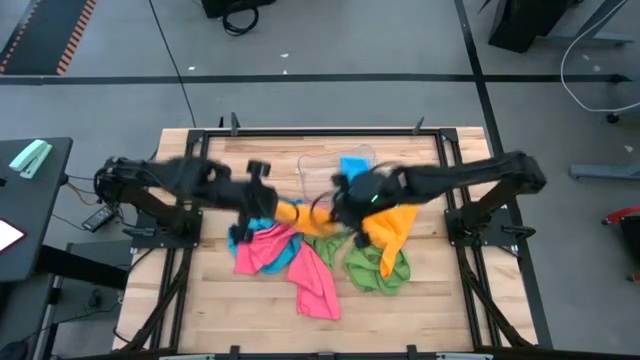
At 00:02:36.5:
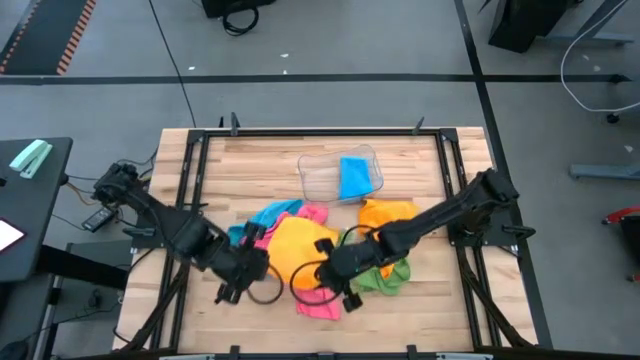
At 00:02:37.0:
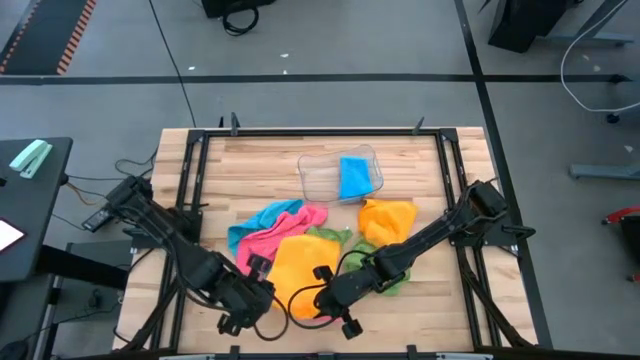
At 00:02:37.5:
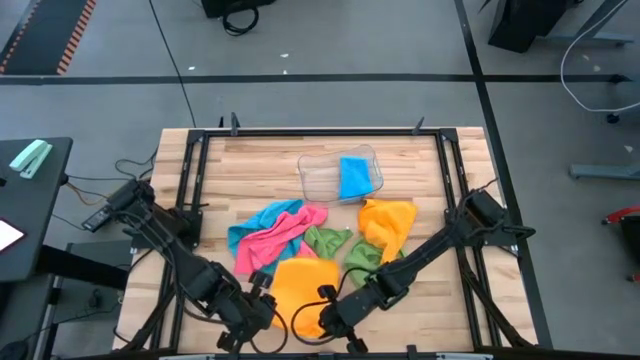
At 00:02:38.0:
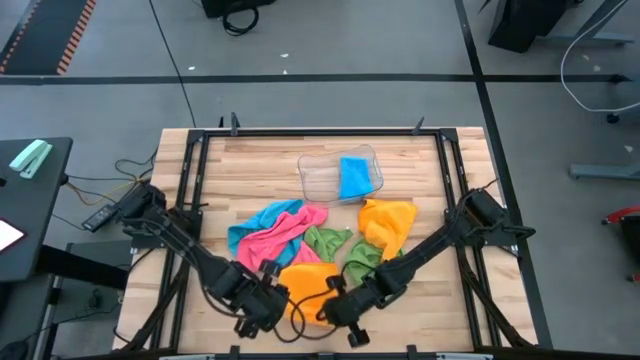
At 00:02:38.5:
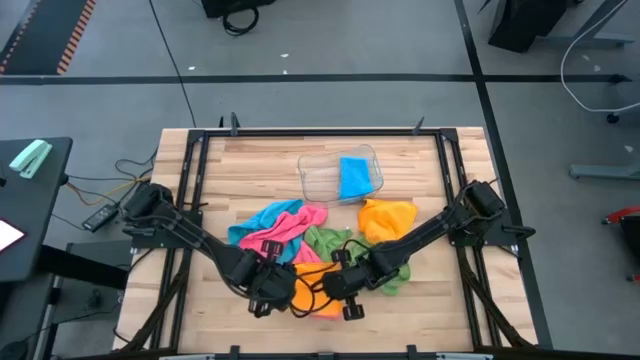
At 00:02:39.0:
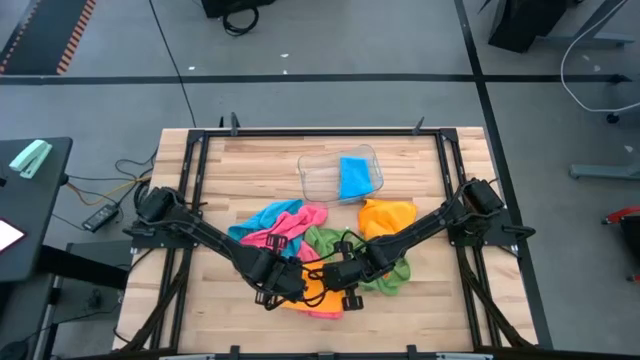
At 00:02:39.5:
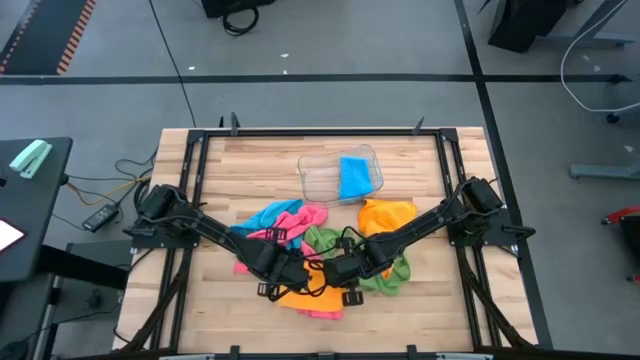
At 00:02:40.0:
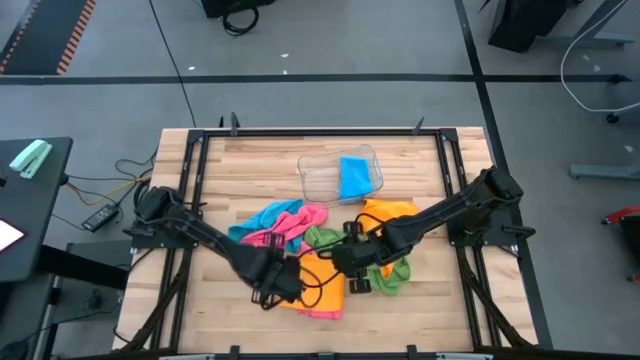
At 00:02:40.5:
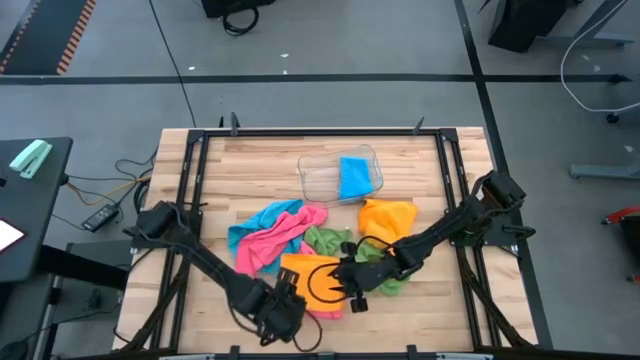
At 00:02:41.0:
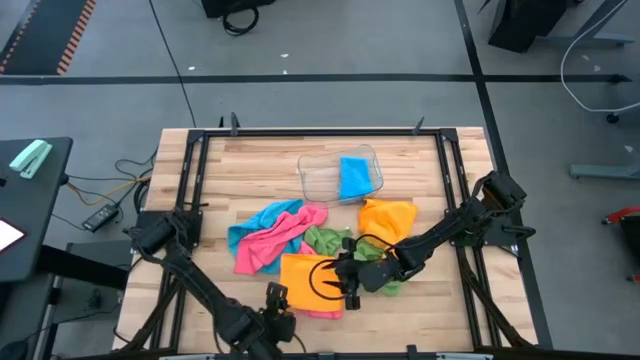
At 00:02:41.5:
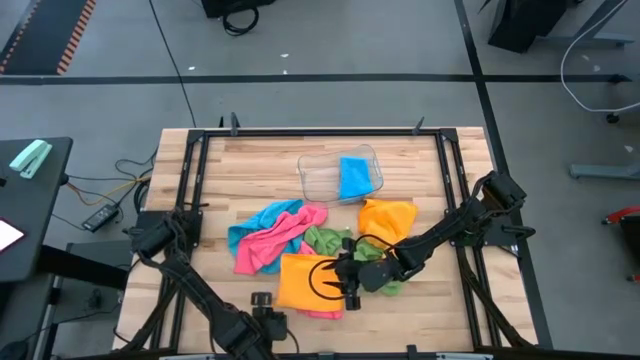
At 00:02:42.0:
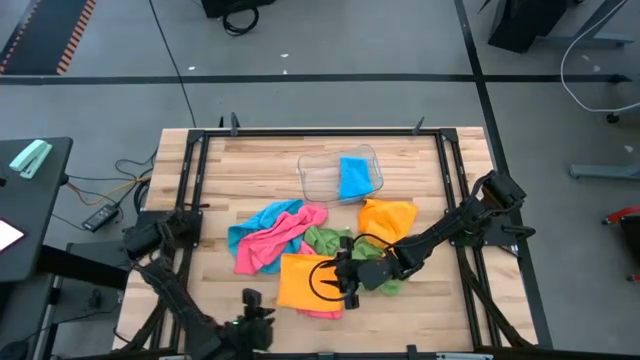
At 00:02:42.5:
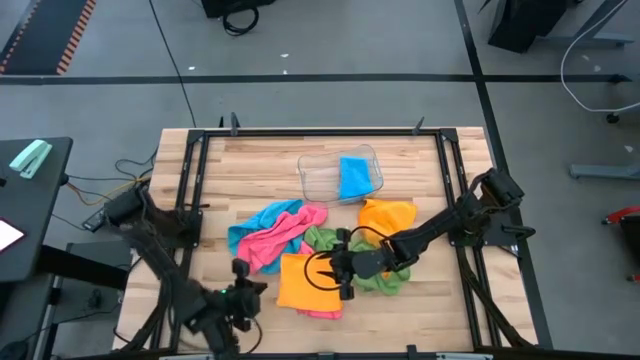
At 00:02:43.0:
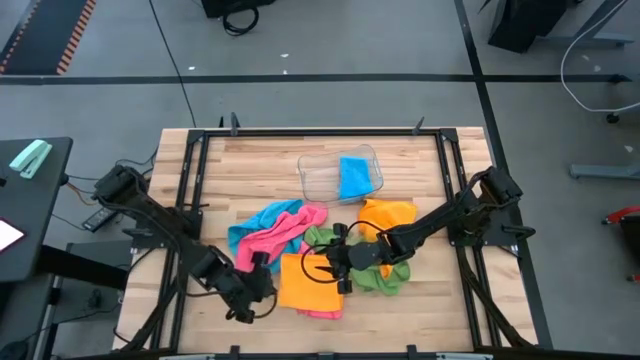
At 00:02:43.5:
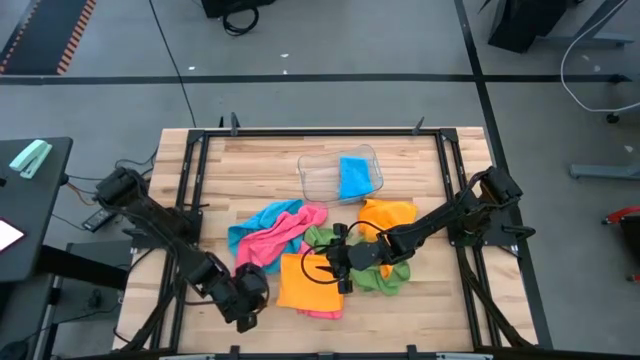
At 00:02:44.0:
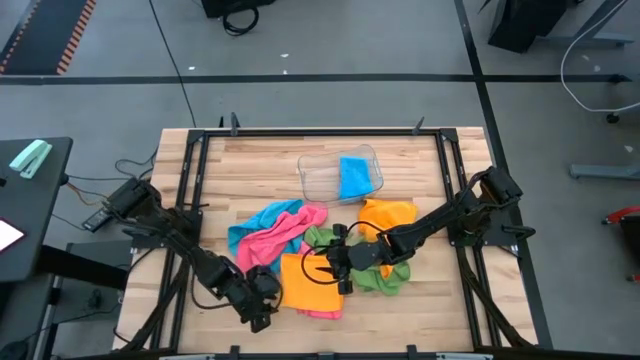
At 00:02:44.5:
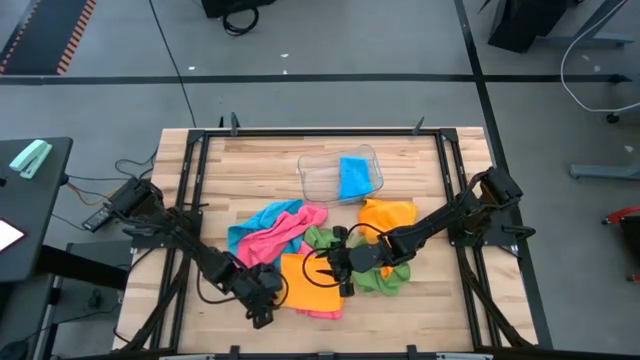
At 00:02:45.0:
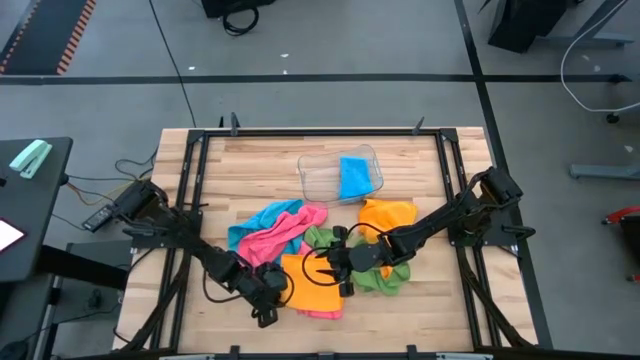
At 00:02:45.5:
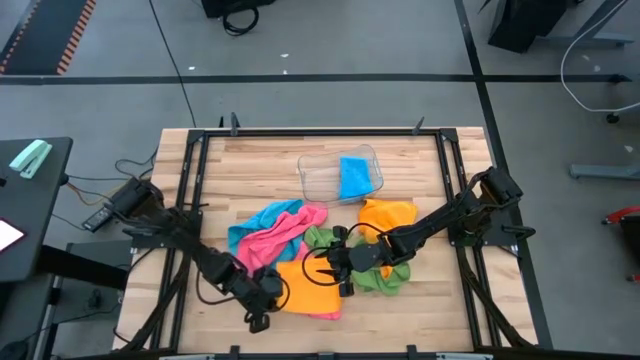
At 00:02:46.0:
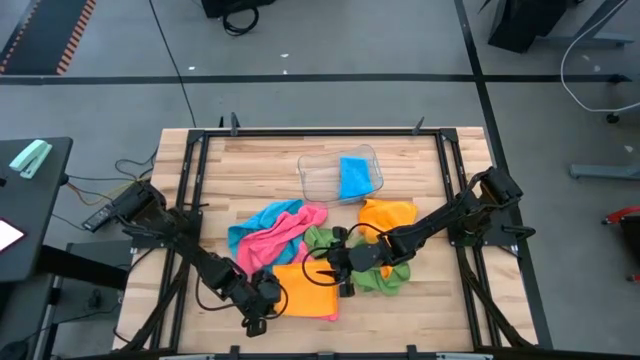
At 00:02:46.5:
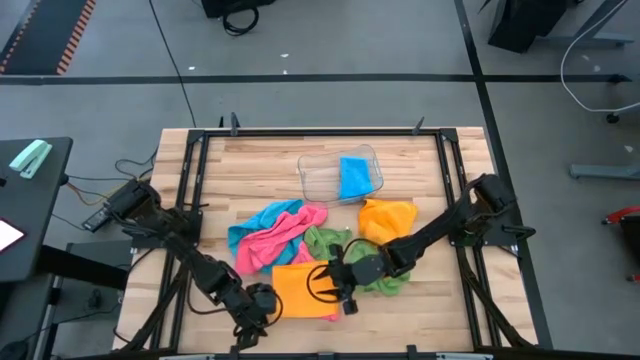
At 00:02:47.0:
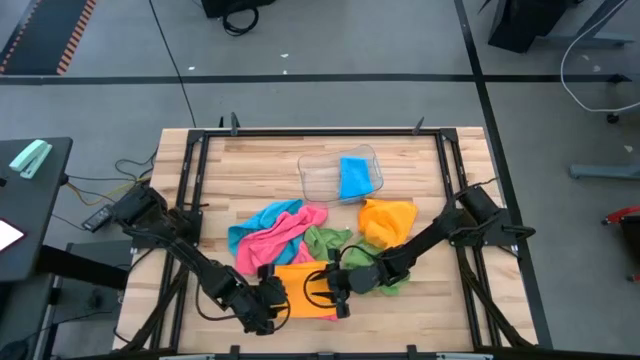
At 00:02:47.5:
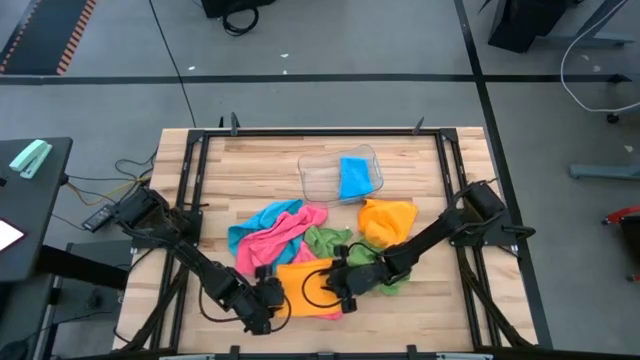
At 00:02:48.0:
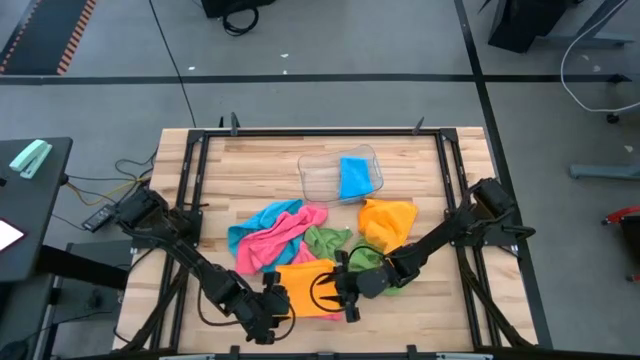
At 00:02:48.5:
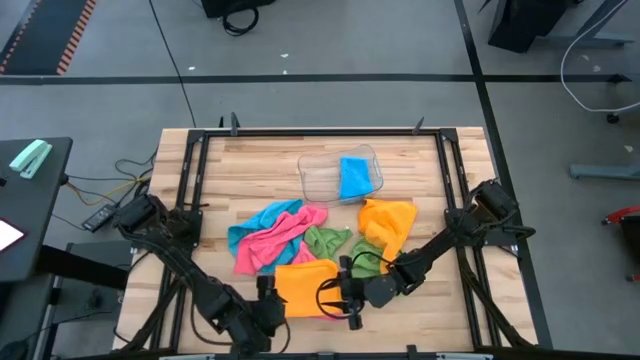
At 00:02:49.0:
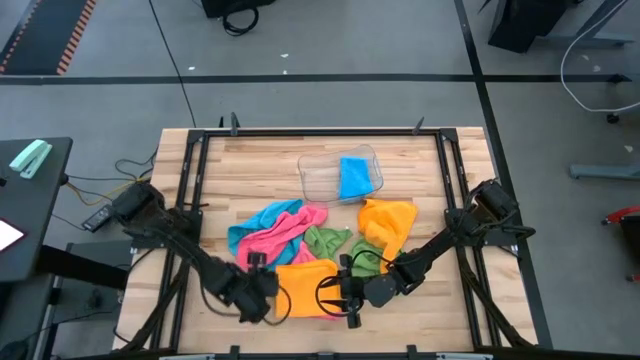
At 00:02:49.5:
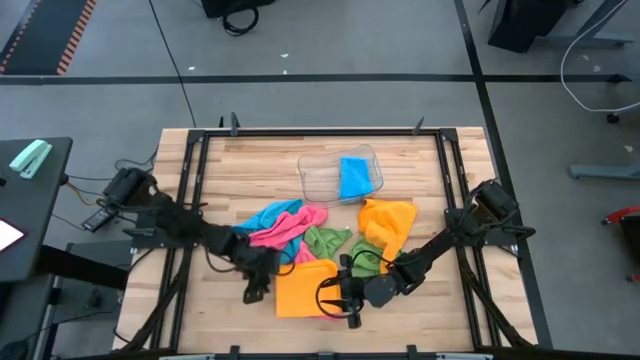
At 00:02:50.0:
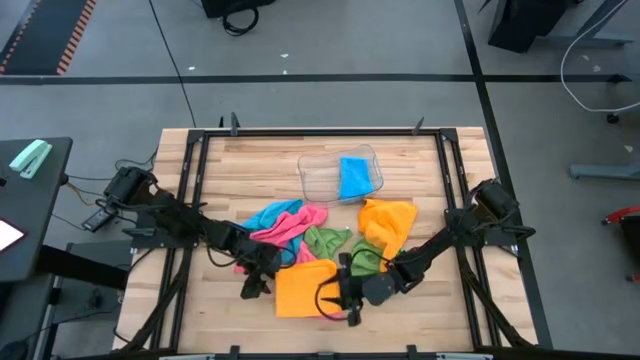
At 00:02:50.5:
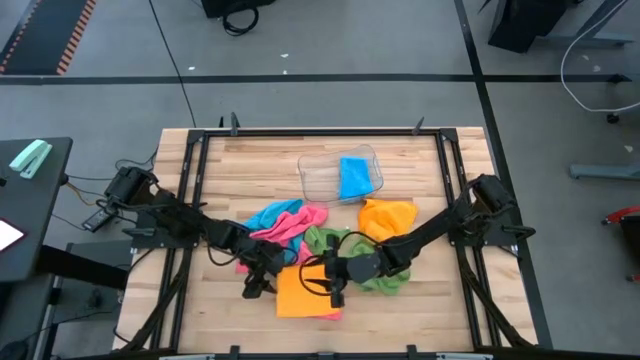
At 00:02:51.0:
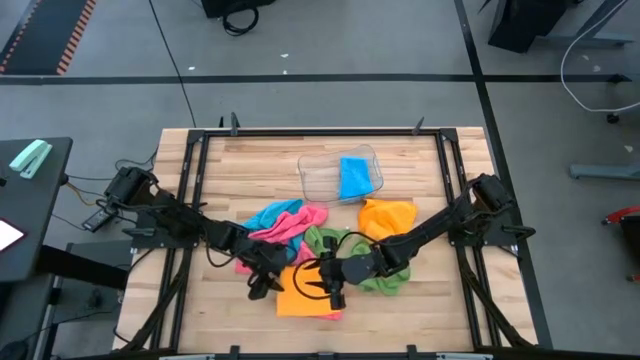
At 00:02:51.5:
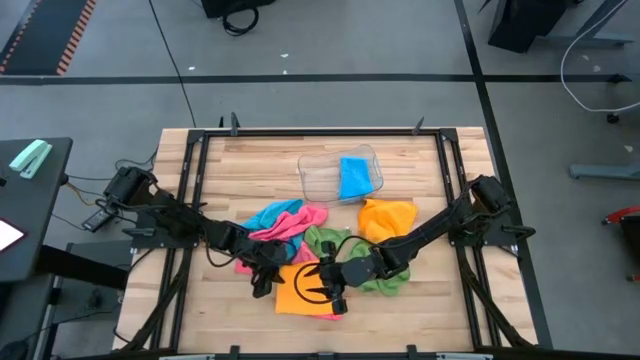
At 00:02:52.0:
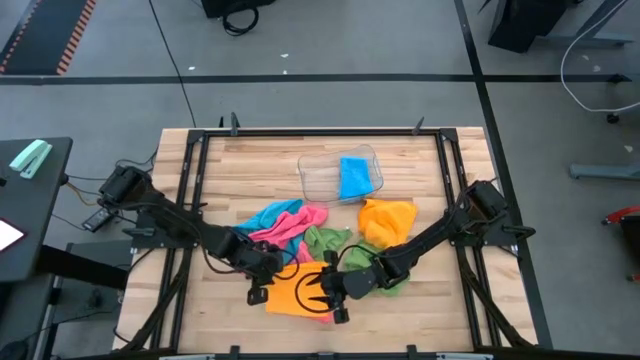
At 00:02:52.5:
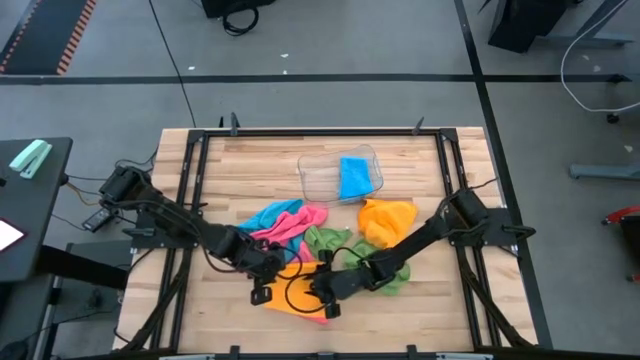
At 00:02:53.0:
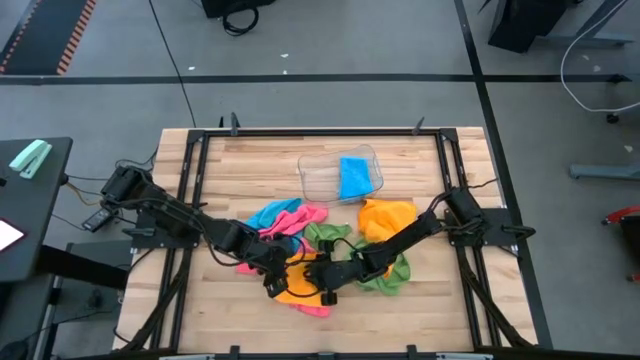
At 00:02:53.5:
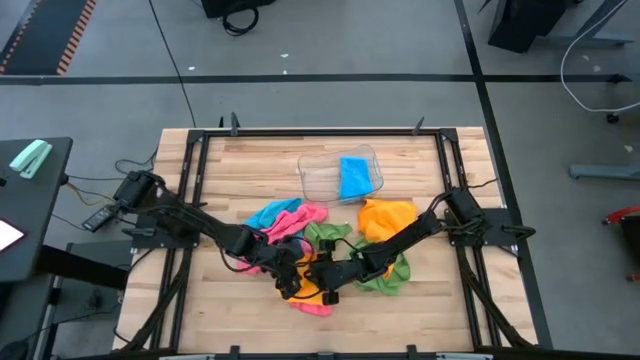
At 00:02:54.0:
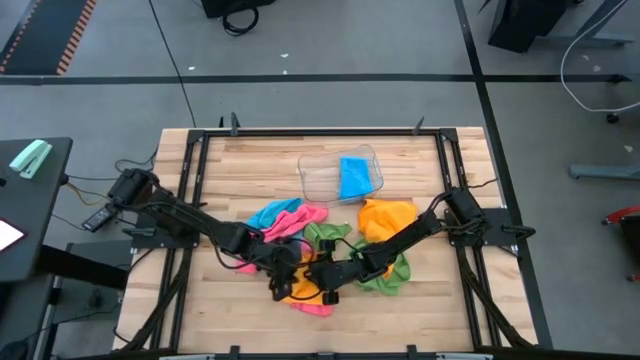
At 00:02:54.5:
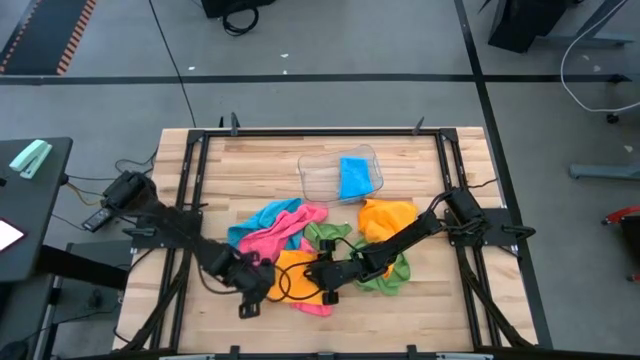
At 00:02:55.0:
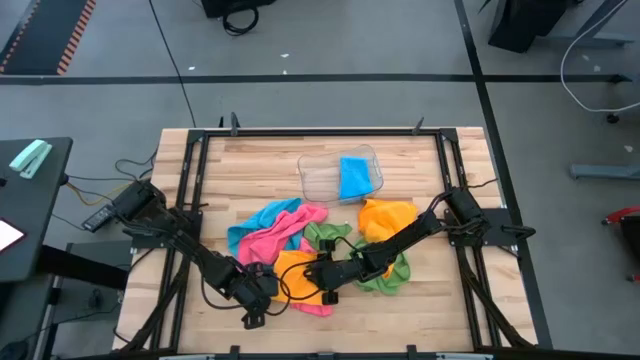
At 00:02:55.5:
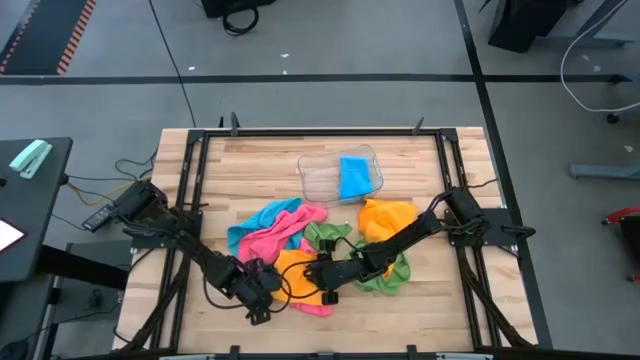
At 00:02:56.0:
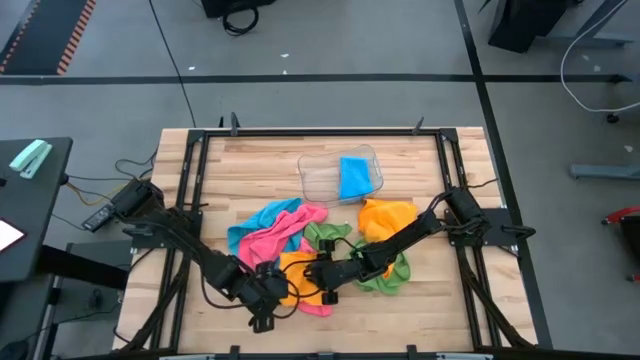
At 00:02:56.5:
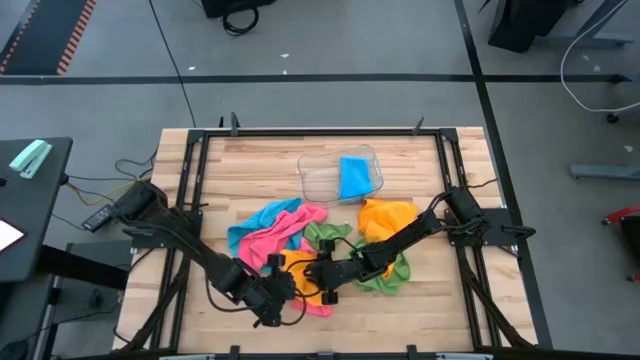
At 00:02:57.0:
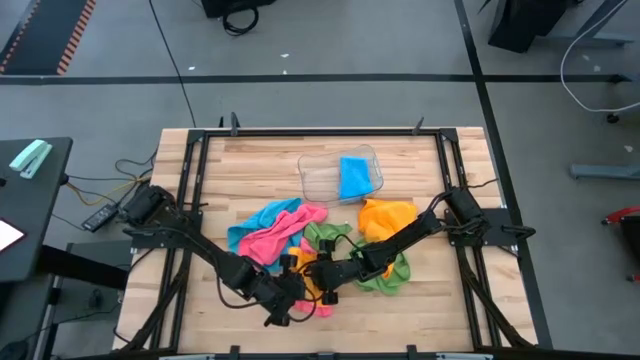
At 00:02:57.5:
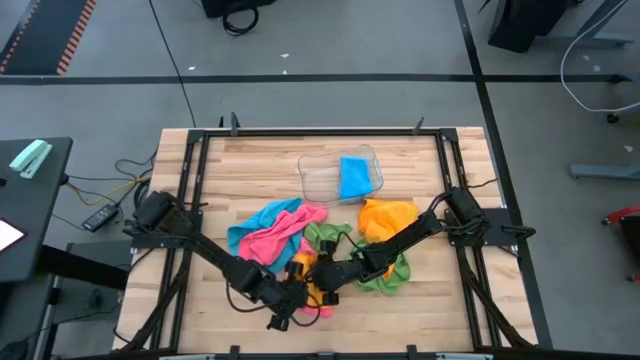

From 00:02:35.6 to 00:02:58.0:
Task: Fold microfiber towels
Fold the left yellow microfiber cloth
